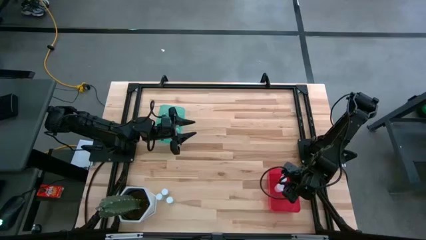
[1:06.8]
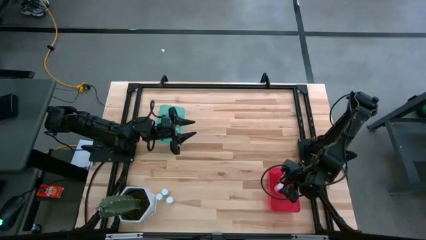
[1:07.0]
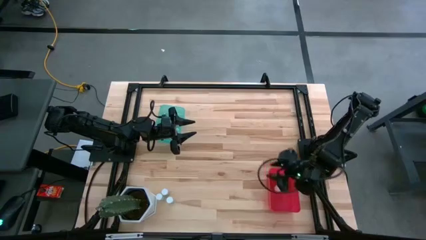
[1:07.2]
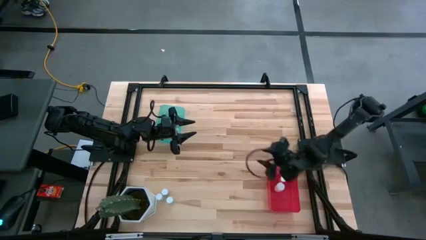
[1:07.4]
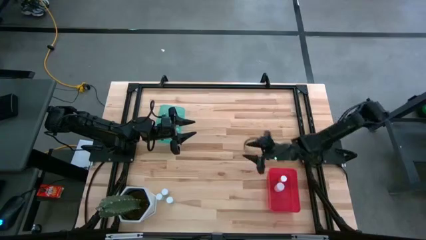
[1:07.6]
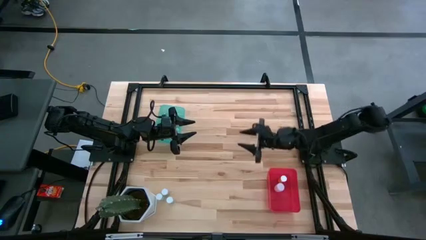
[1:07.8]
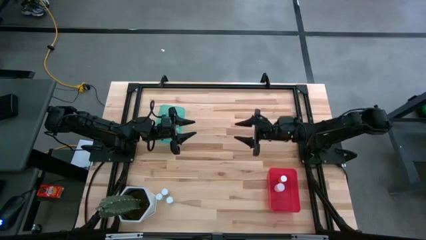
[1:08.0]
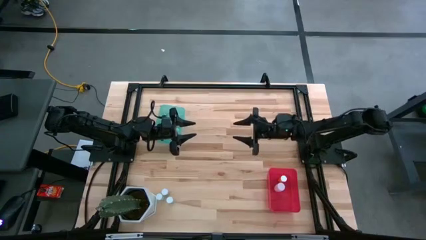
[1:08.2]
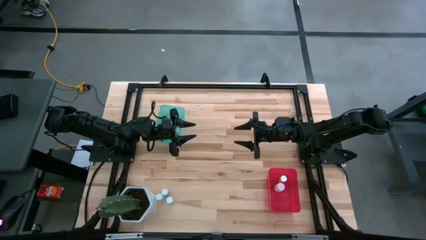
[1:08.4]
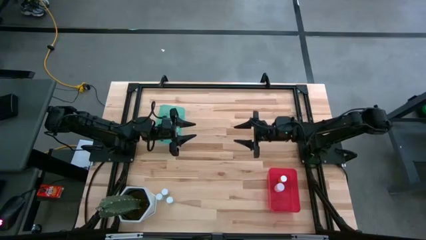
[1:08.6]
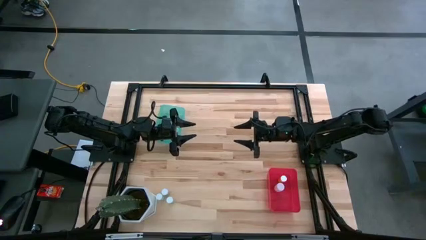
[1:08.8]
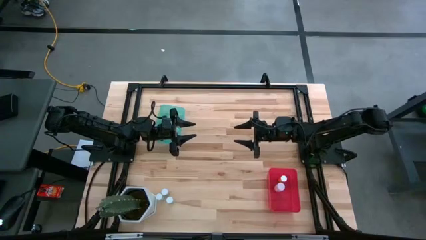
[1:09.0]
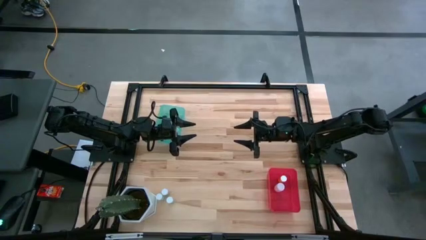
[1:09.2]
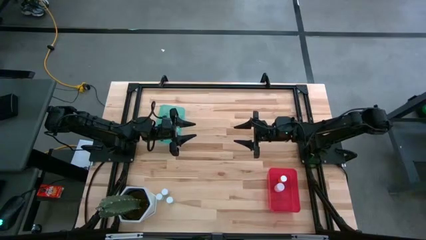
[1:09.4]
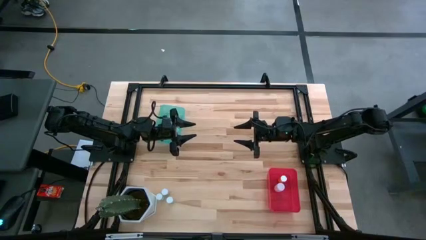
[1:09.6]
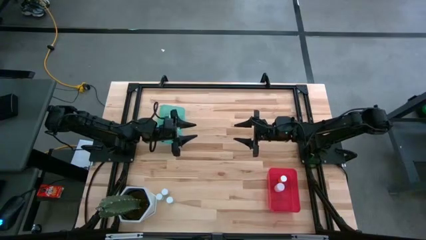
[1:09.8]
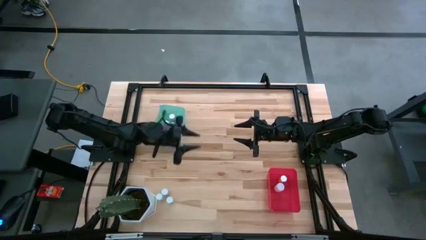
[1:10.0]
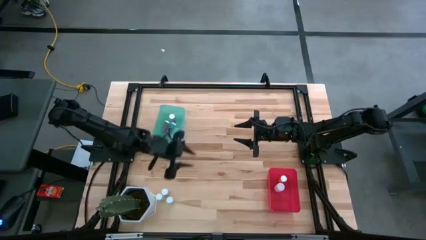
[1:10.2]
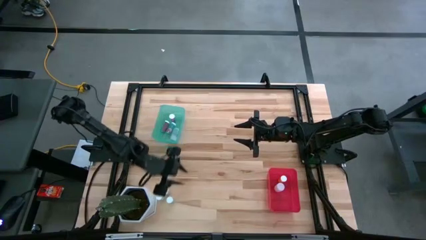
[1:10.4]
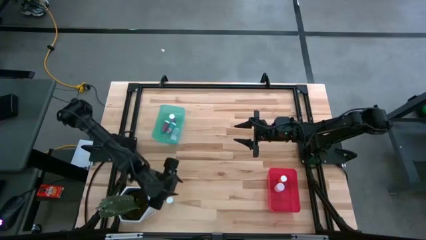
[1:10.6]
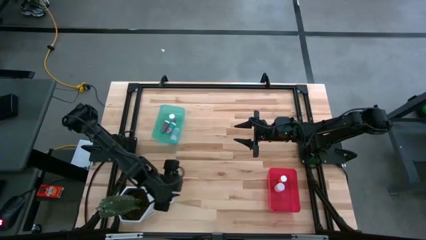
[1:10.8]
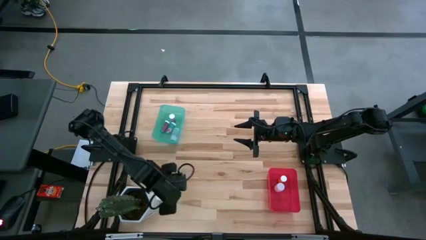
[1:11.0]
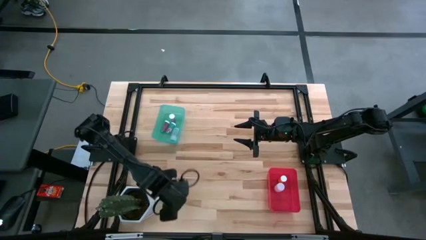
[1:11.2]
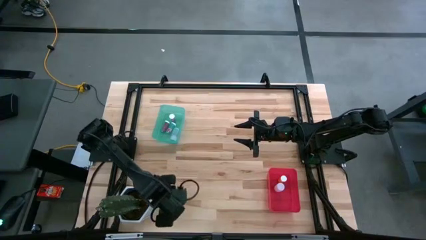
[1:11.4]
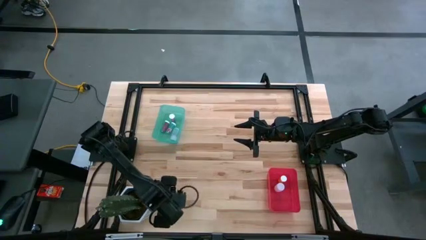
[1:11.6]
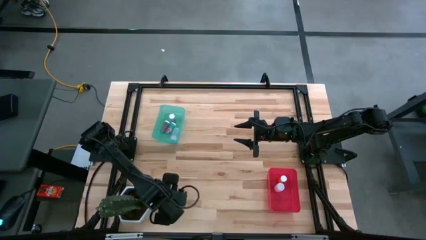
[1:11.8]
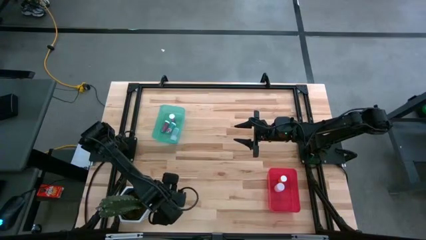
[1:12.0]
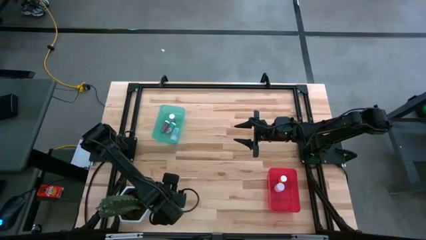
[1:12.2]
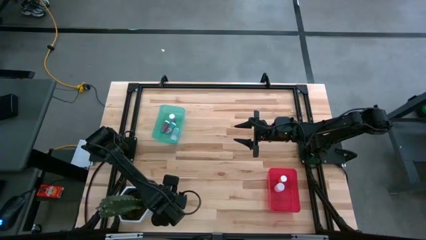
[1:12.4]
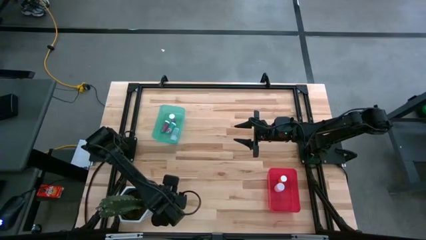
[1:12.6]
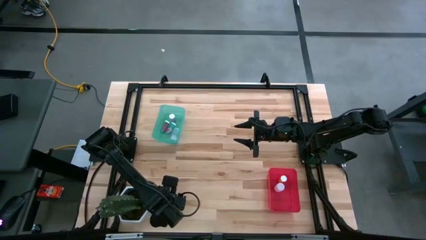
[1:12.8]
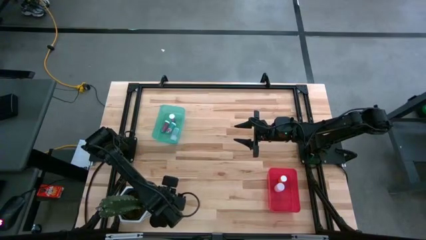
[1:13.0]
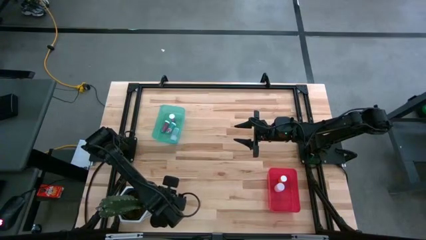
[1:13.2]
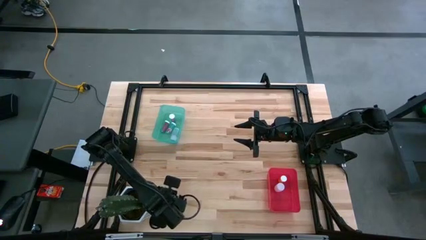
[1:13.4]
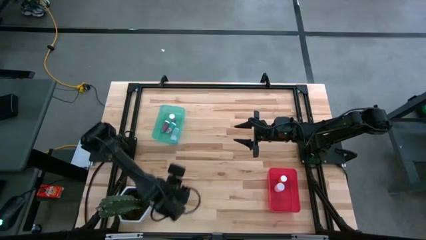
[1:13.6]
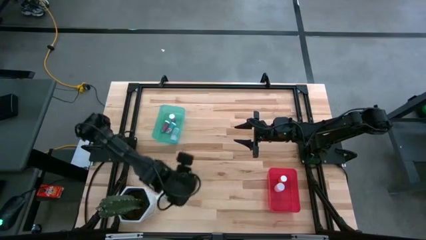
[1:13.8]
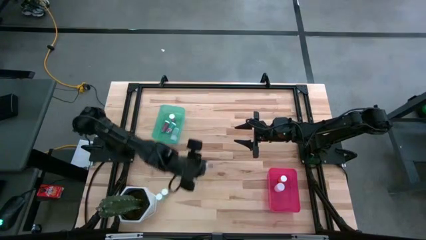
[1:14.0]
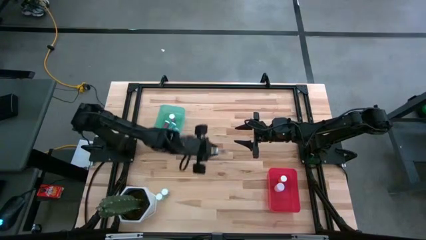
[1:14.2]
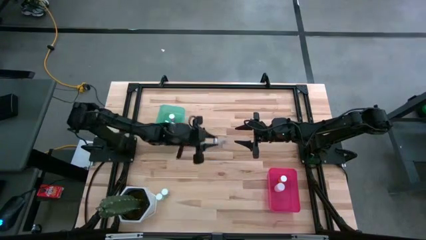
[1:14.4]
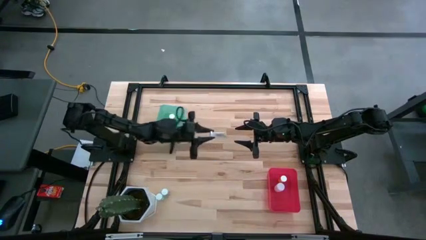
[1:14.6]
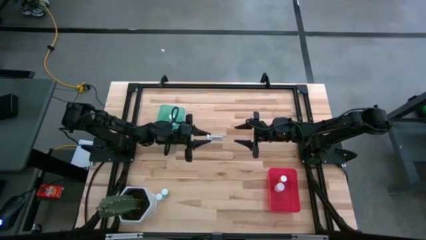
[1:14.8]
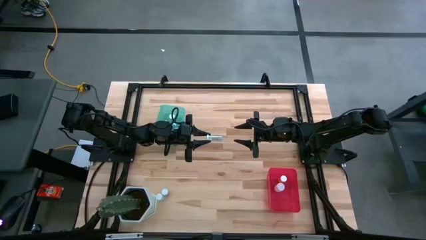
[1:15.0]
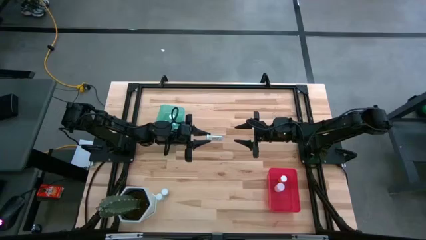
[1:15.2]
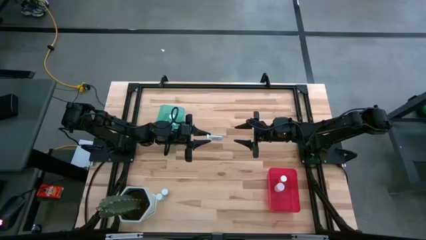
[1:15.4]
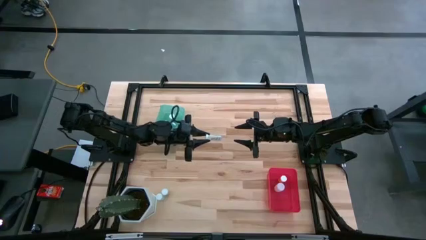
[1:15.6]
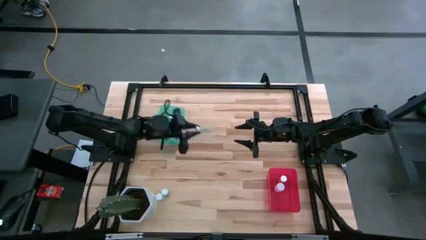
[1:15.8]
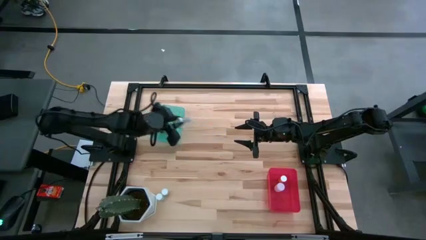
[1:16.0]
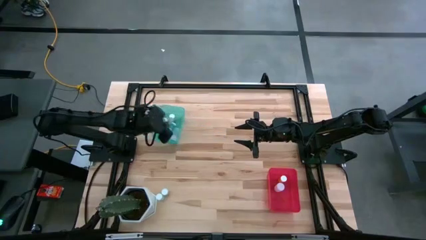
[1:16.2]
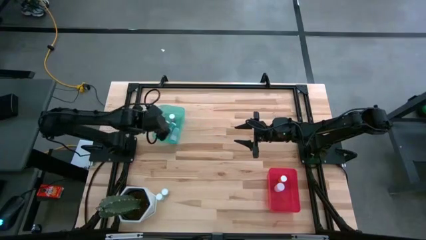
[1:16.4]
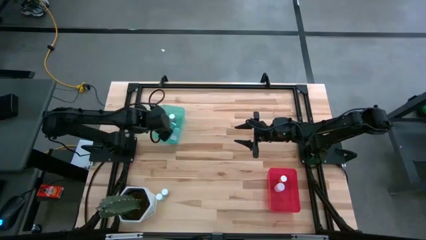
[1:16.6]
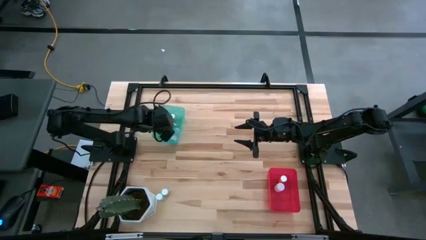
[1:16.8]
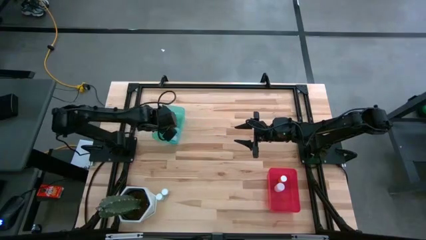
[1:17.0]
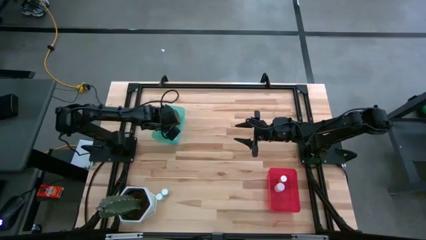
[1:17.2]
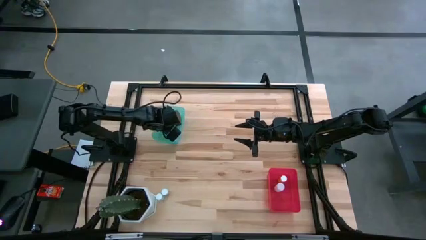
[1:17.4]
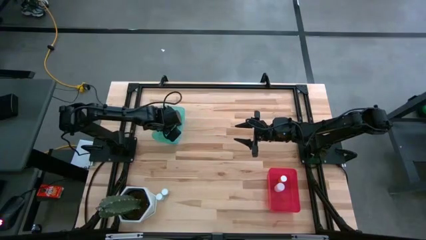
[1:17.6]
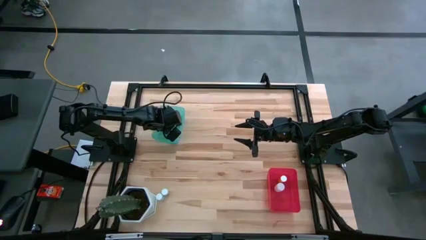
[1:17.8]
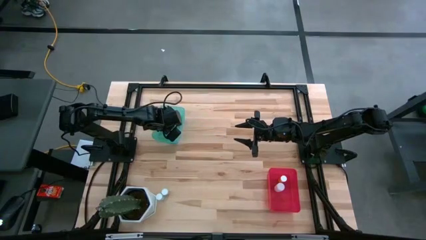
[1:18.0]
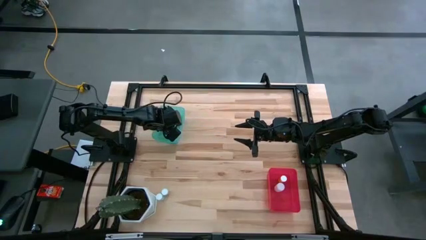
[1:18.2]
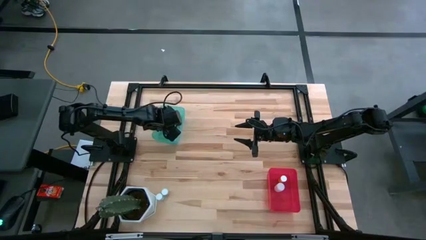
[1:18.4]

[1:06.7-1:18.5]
Task: Pick and place medicine bottles into bin by pill shape (circle, oval)
Put the bottom blue capsule bottle into the blue bin
